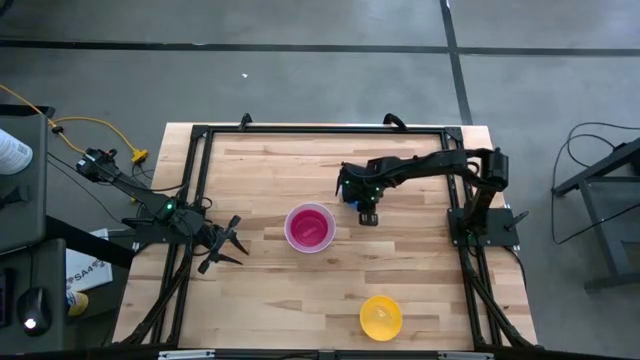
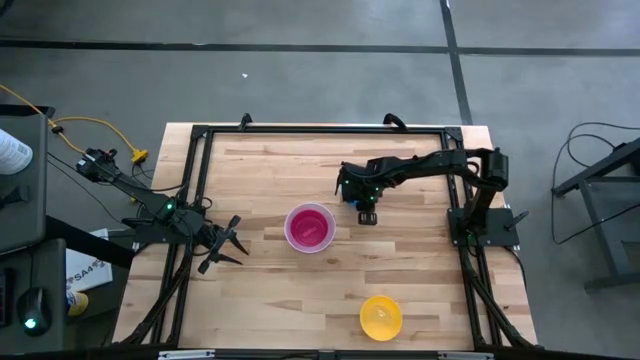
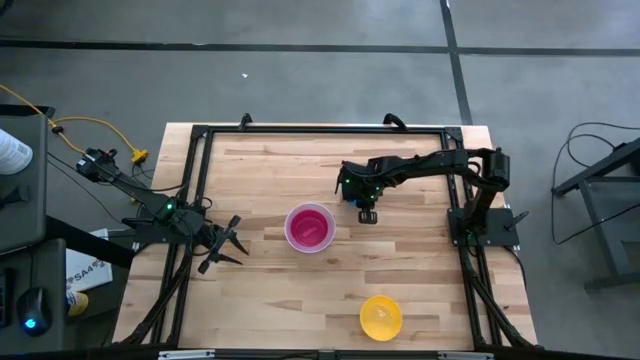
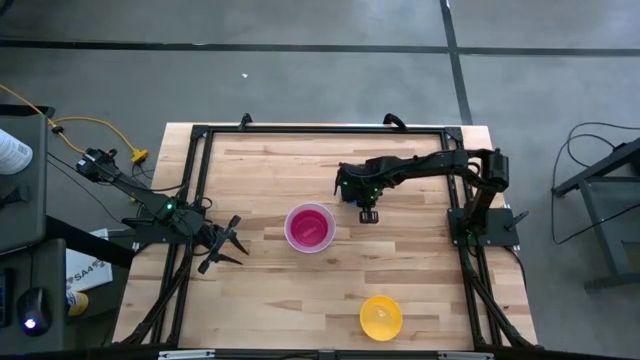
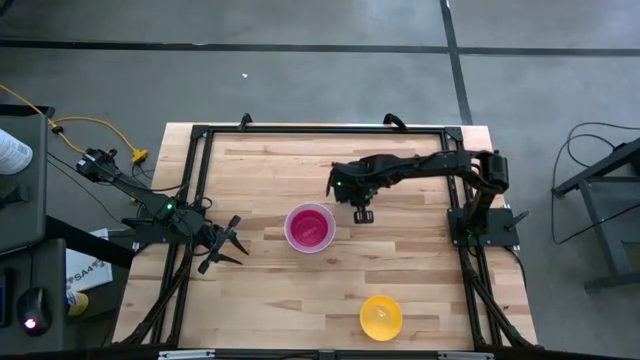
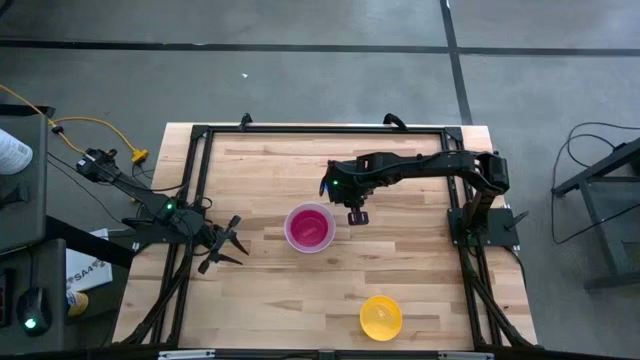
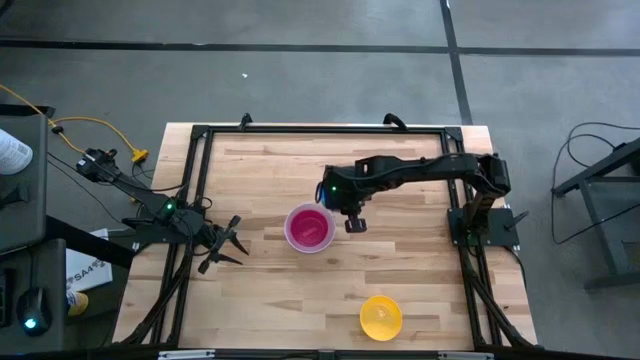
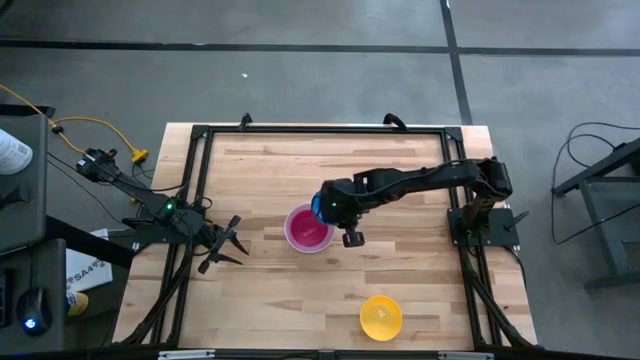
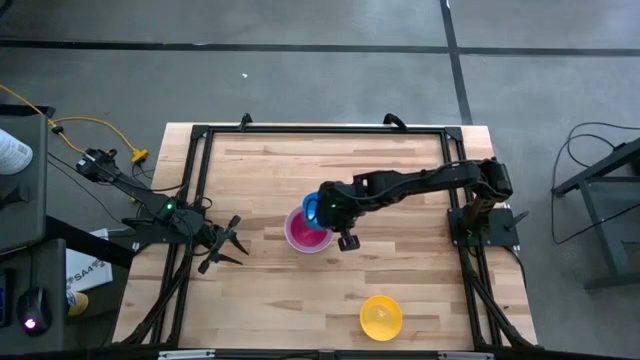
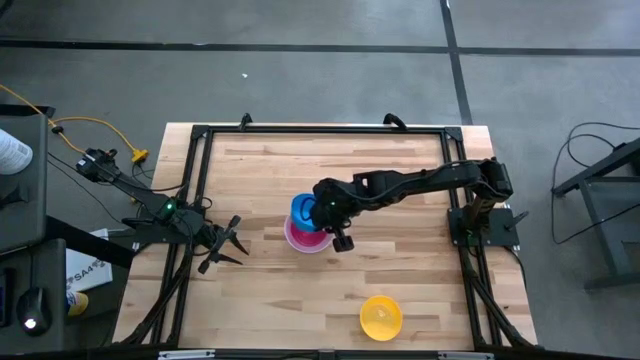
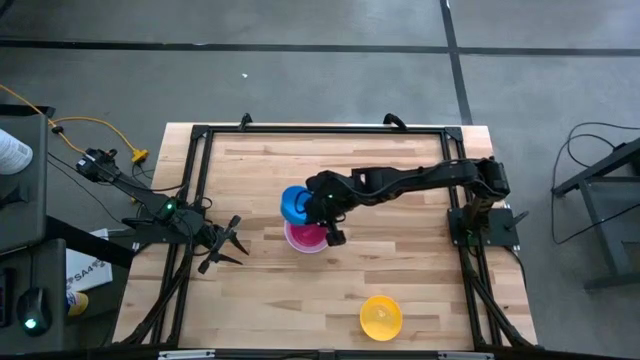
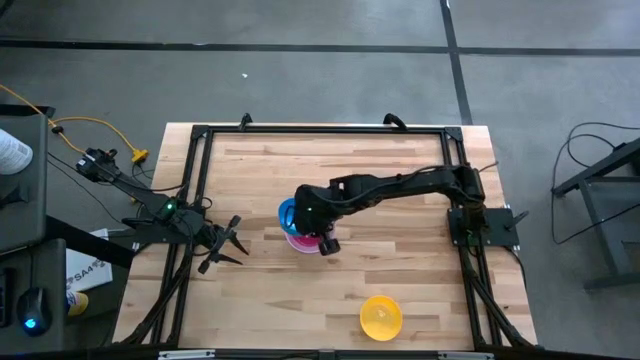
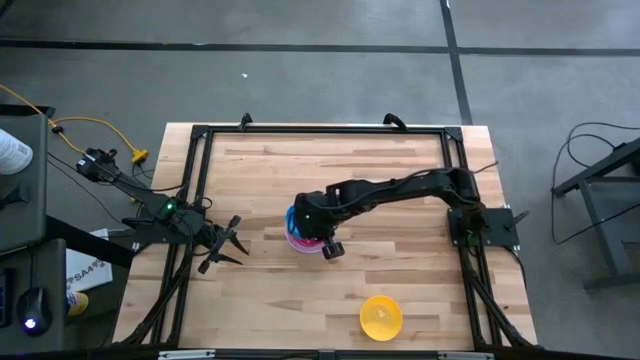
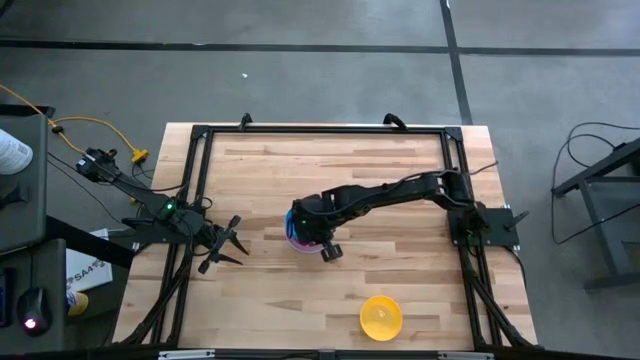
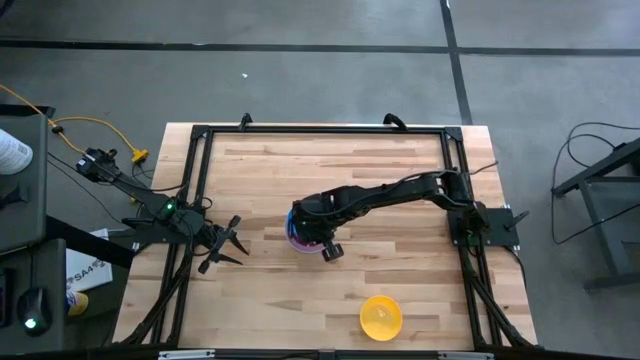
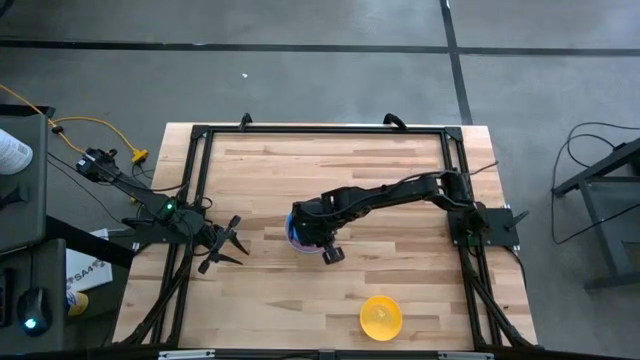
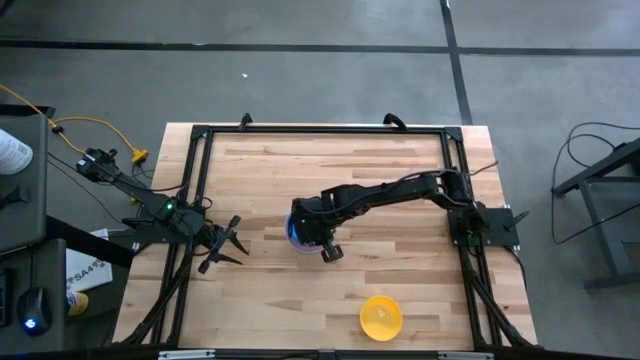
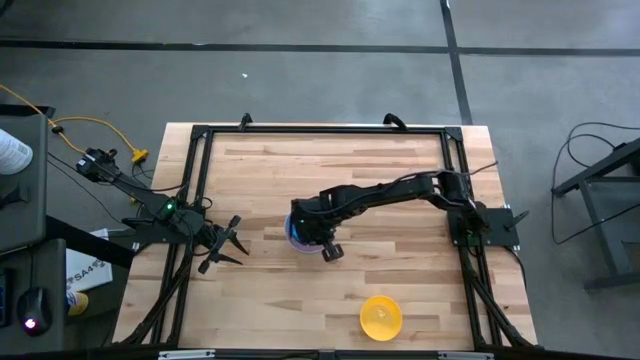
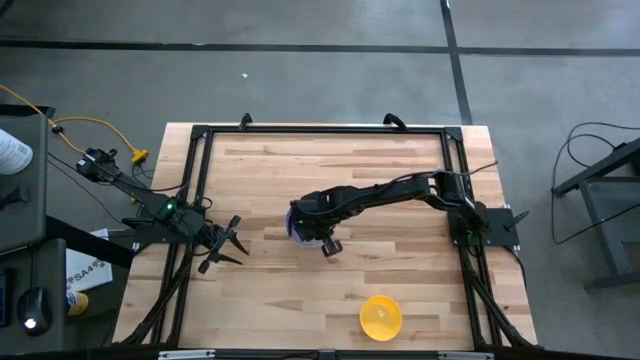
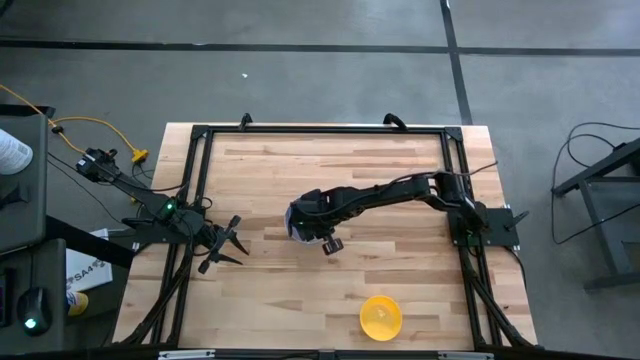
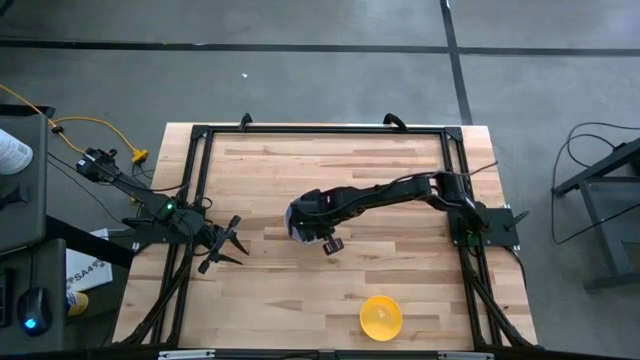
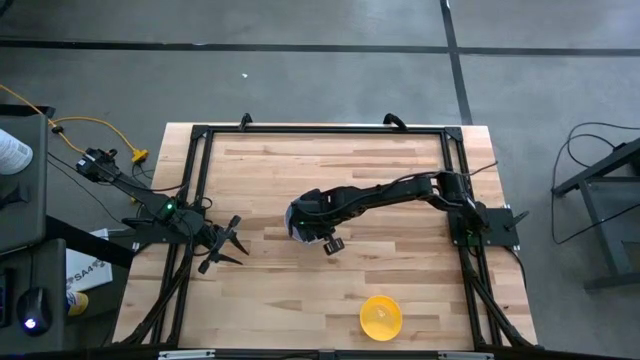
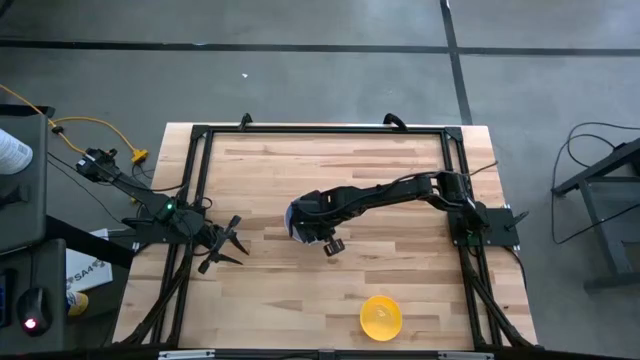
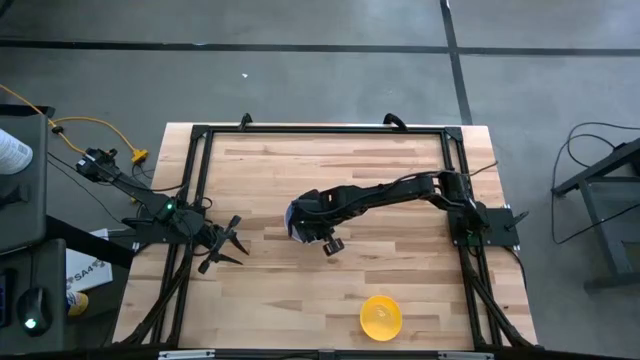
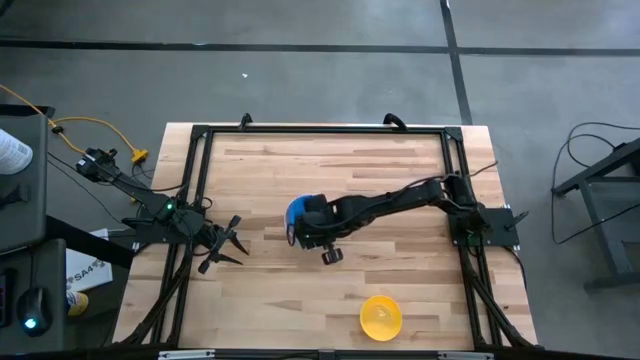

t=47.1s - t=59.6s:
Stack the blue bowl into the pink bowl
